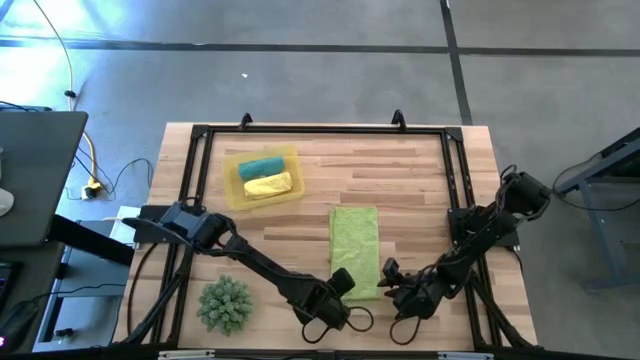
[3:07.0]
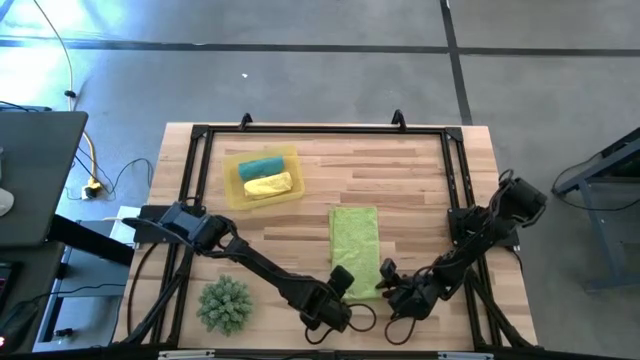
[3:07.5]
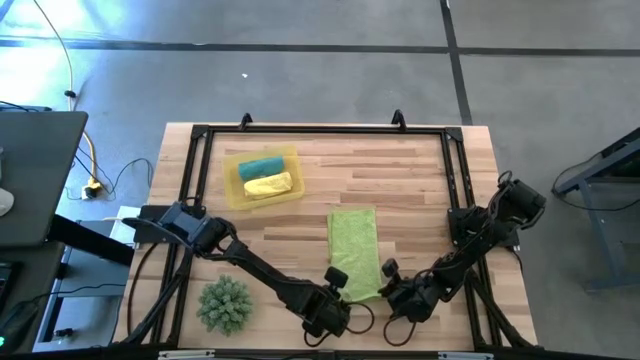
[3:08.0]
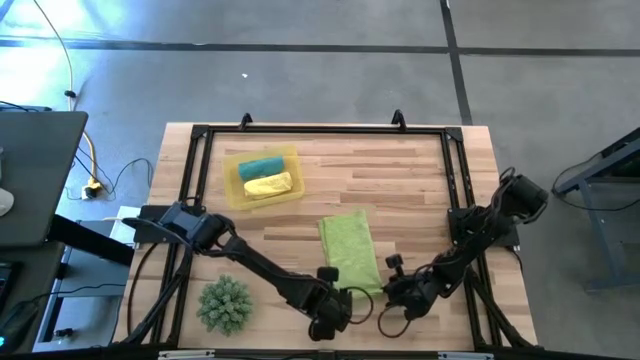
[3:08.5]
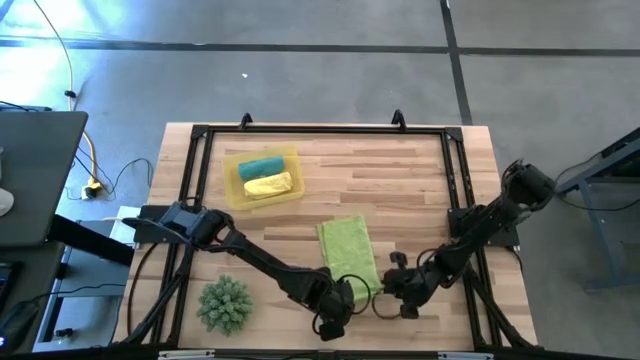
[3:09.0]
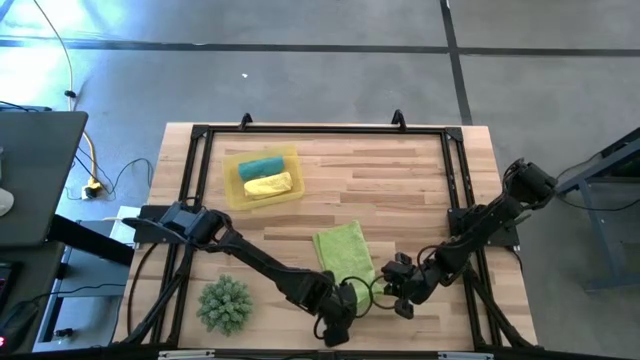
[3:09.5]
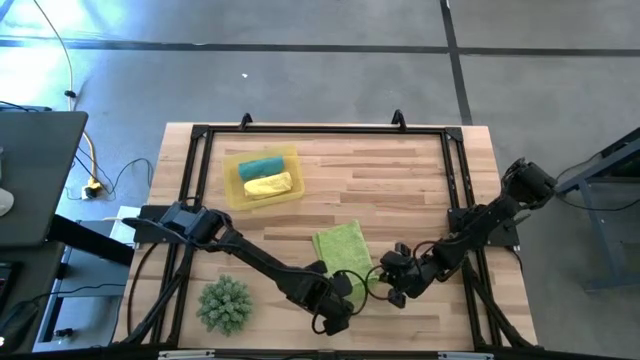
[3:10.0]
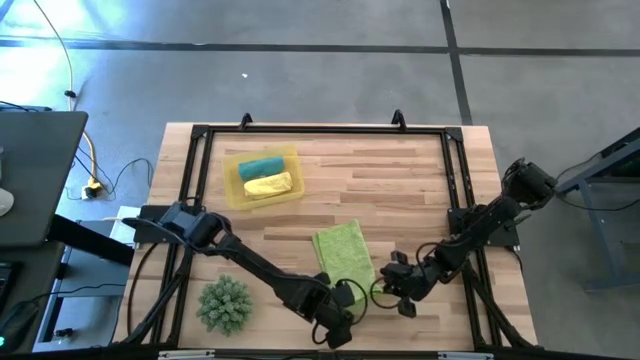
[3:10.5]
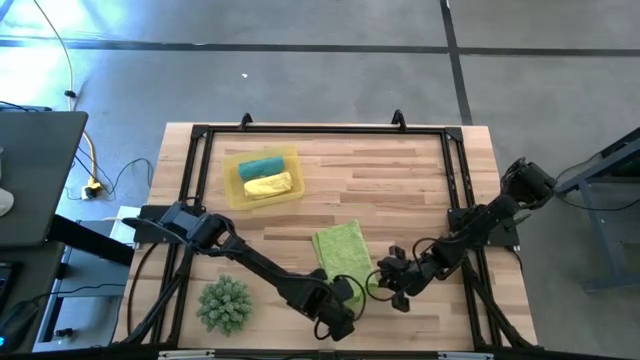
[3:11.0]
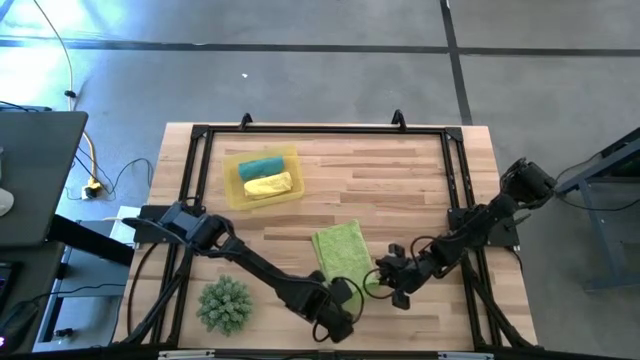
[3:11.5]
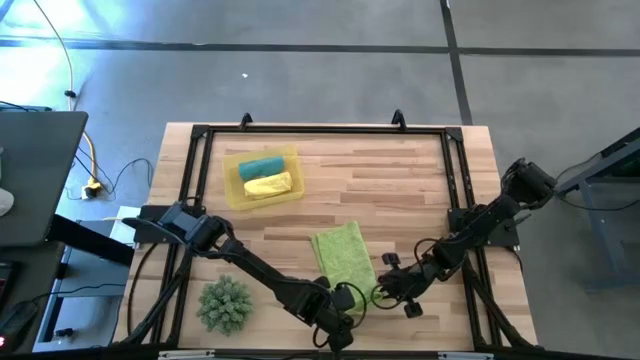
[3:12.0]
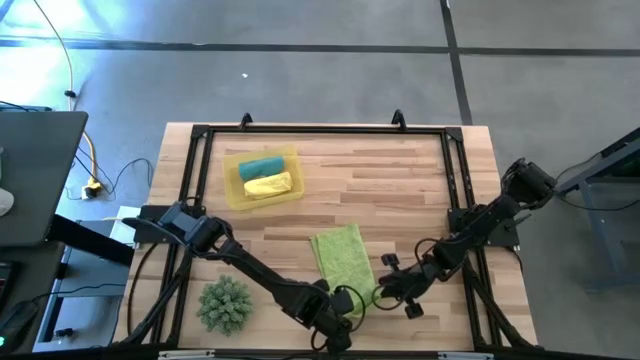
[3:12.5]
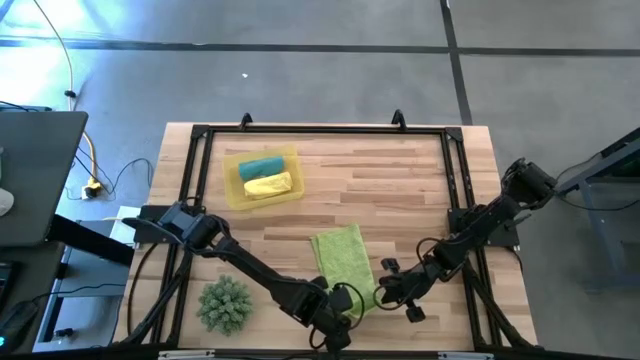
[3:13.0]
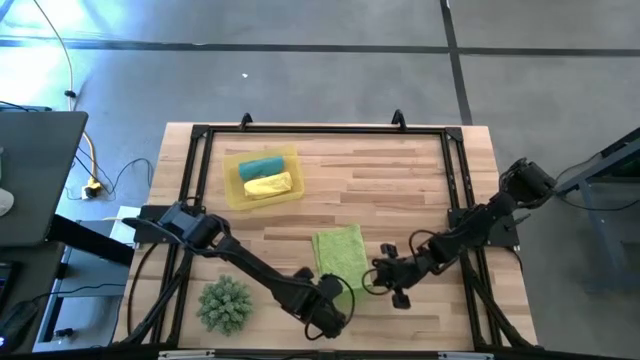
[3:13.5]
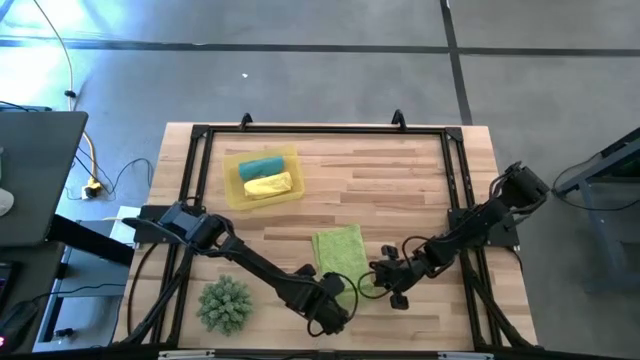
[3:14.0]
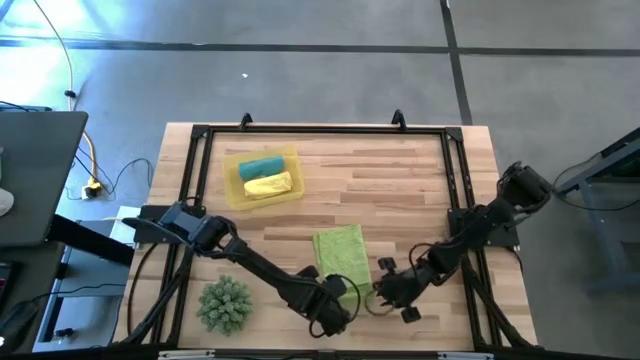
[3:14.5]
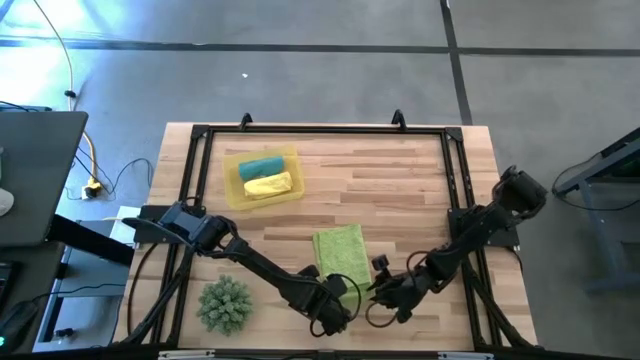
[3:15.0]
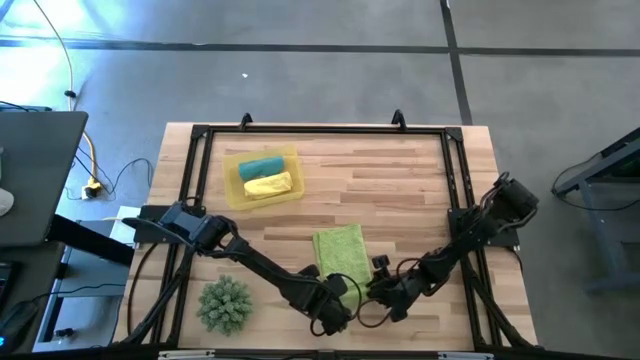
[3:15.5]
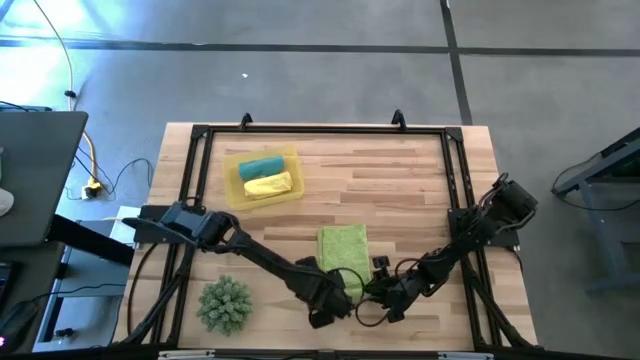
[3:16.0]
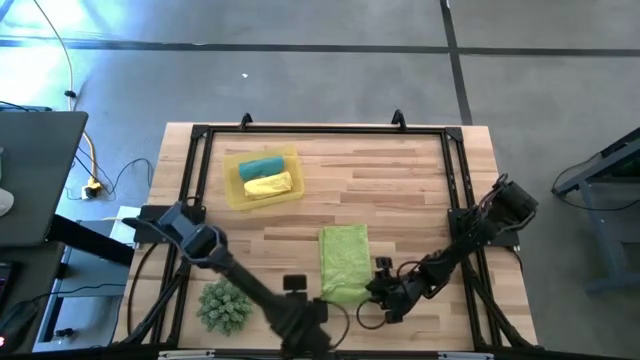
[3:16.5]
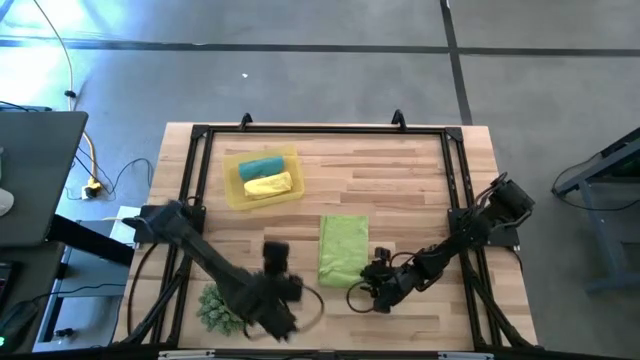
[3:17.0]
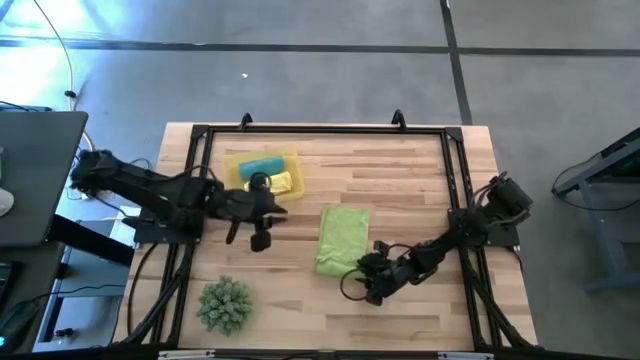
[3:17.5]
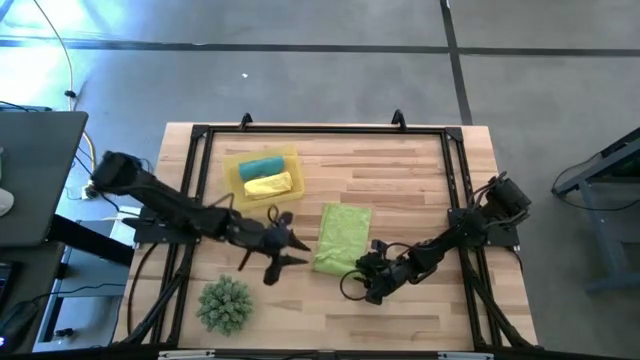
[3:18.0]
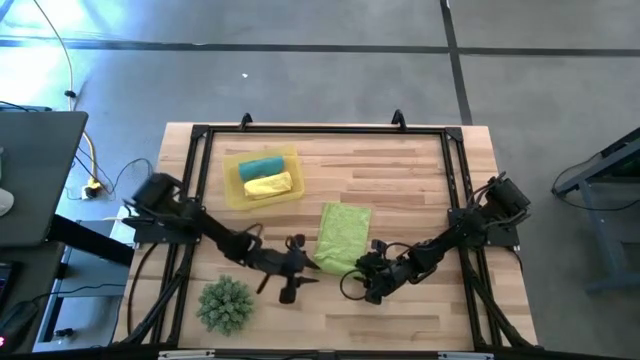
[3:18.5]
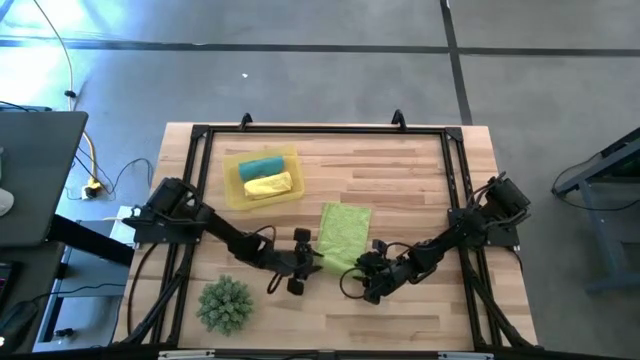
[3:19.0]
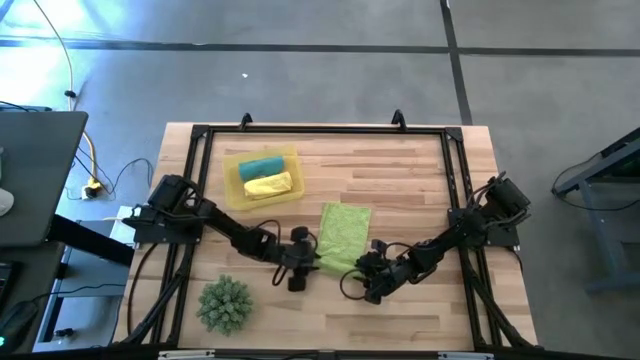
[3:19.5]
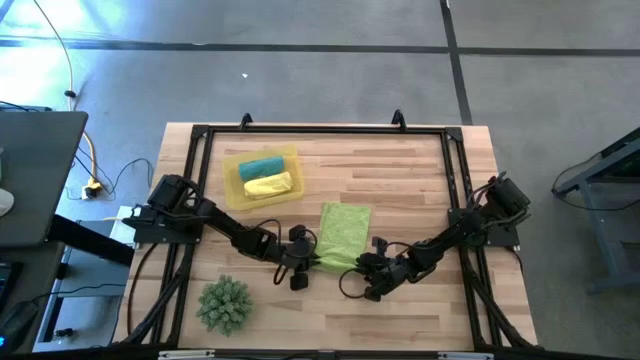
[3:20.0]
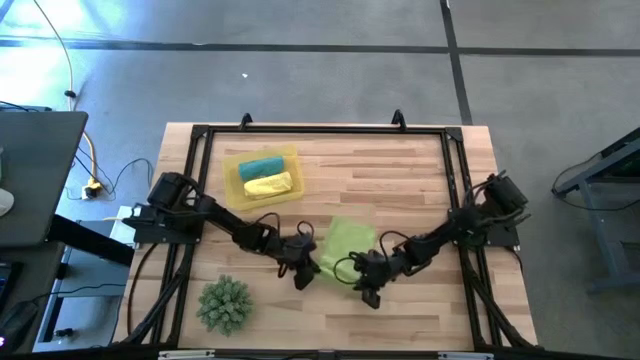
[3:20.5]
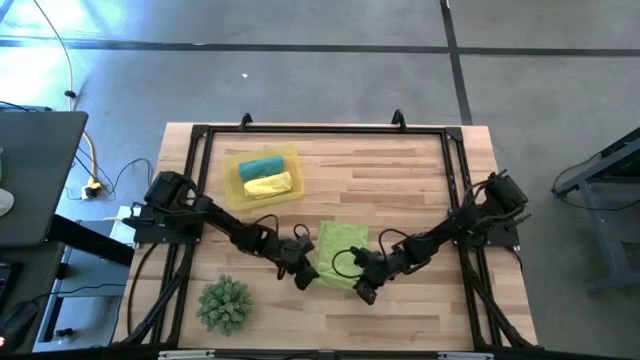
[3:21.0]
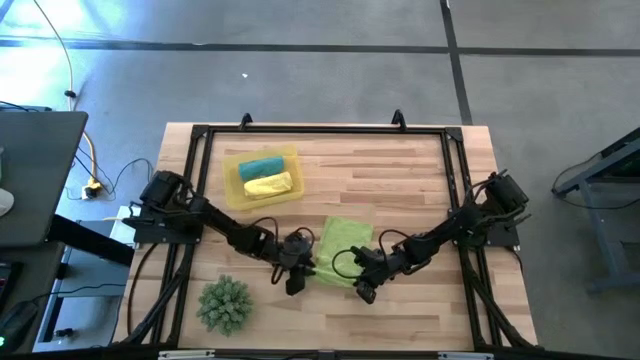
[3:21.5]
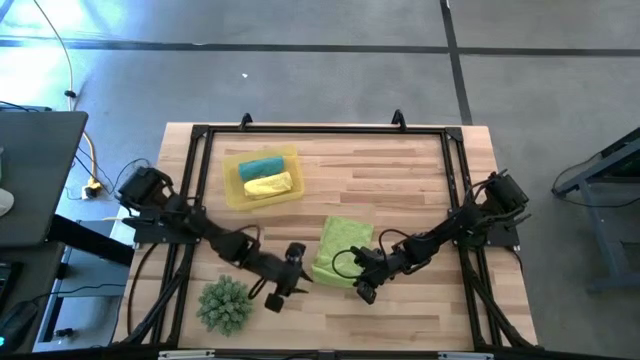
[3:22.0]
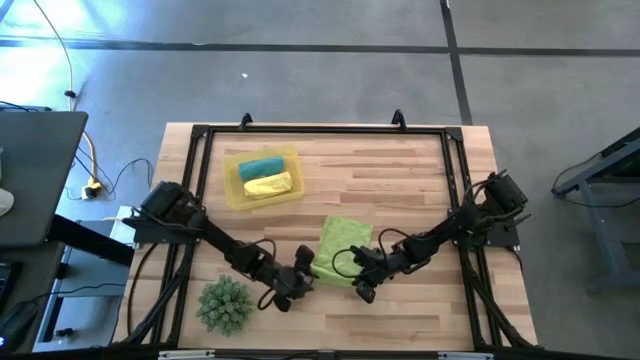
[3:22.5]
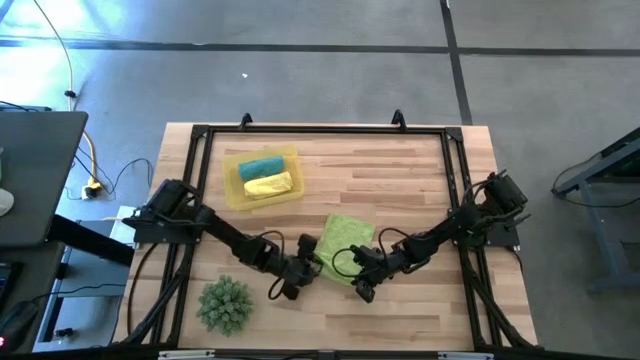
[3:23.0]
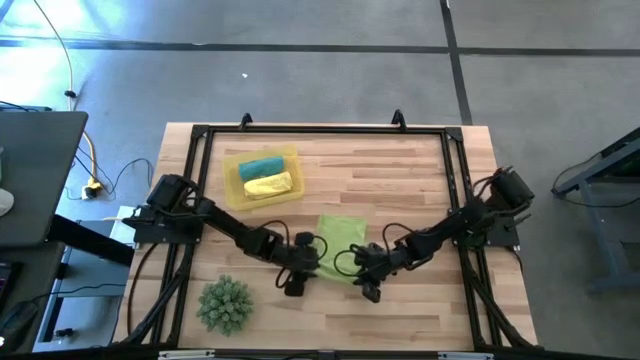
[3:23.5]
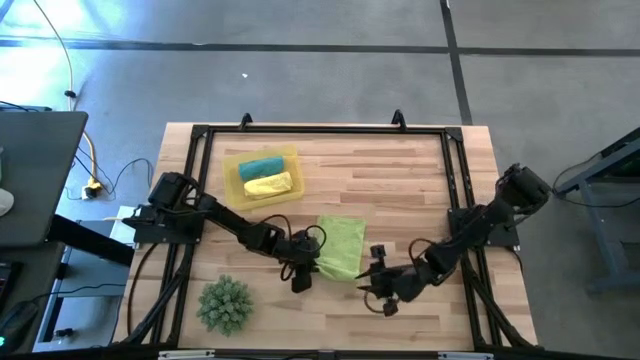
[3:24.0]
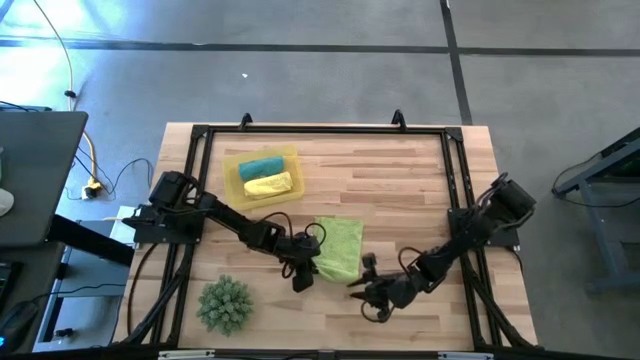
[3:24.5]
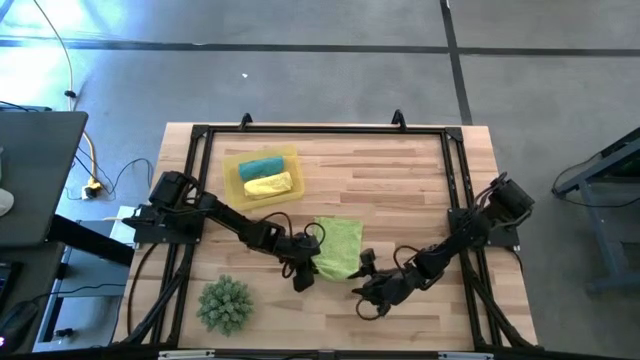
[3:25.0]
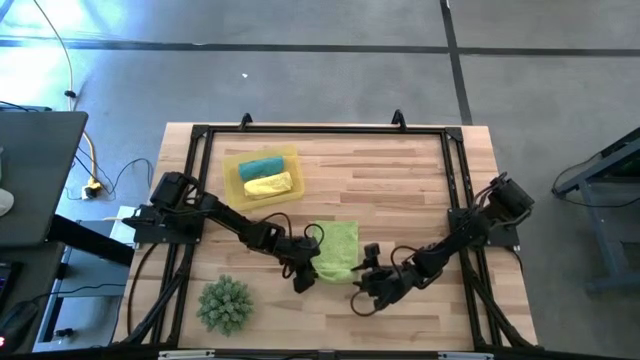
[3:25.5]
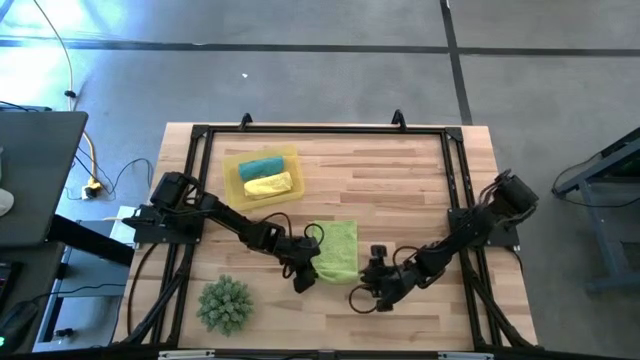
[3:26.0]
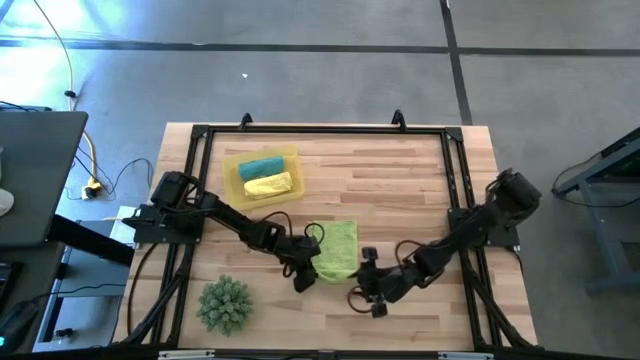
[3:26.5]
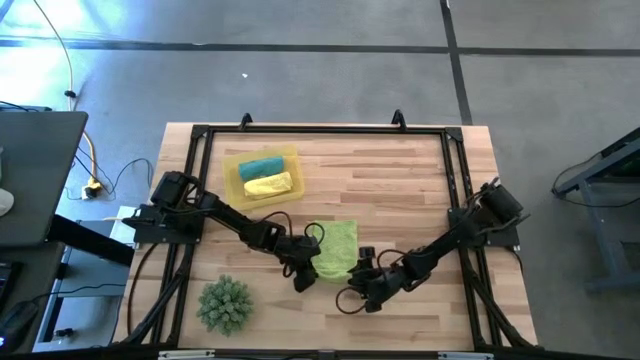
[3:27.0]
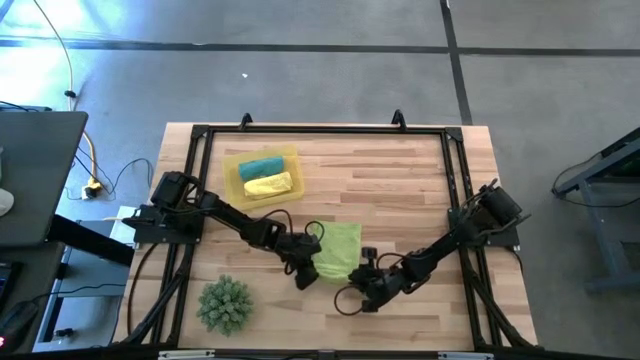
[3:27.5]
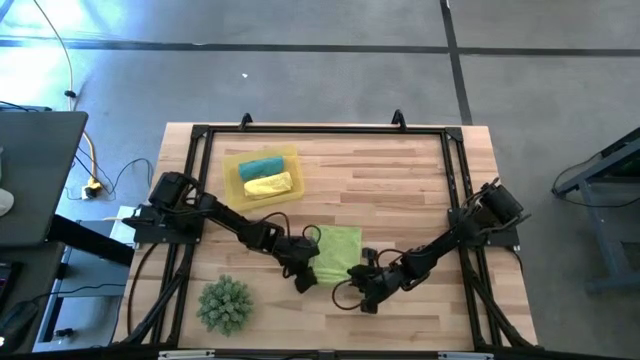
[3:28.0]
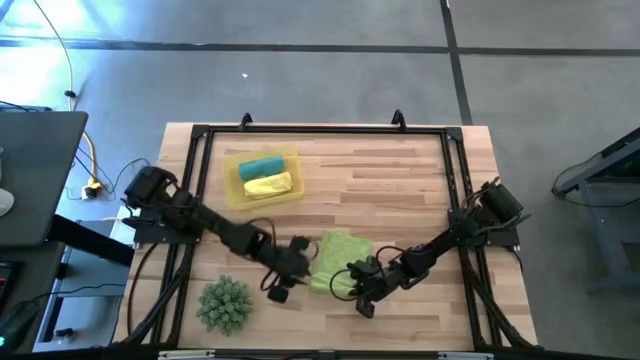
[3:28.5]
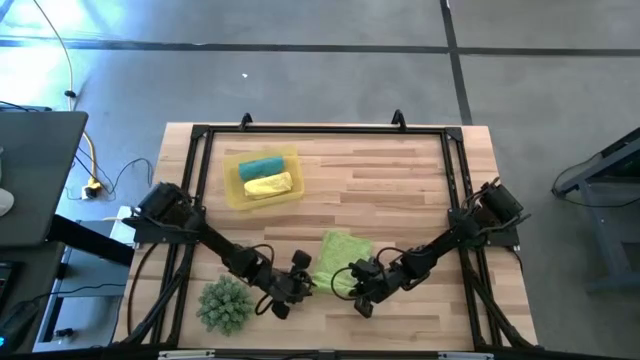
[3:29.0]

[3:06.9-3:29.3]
Task: Roll microfiber towels into tight, uniform cylinder then place into a basket
Roll the green microfiber towel
